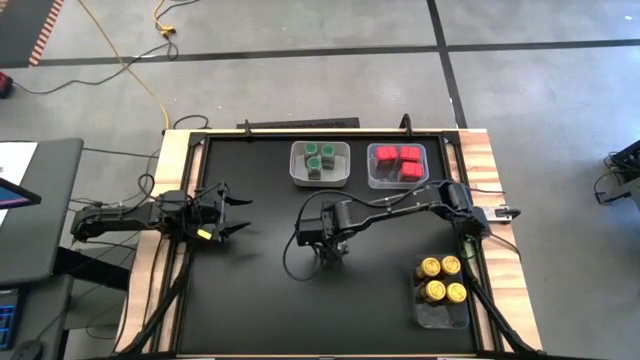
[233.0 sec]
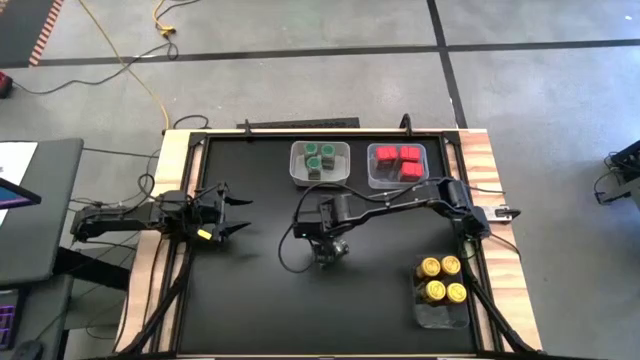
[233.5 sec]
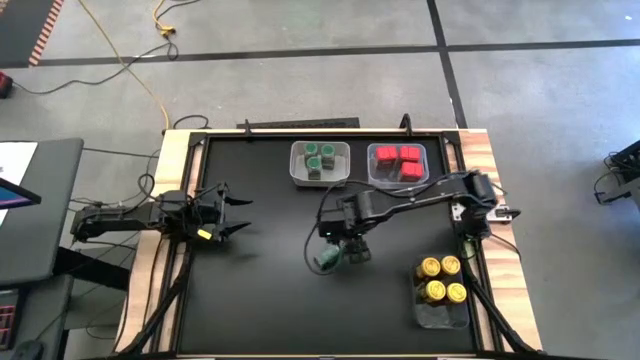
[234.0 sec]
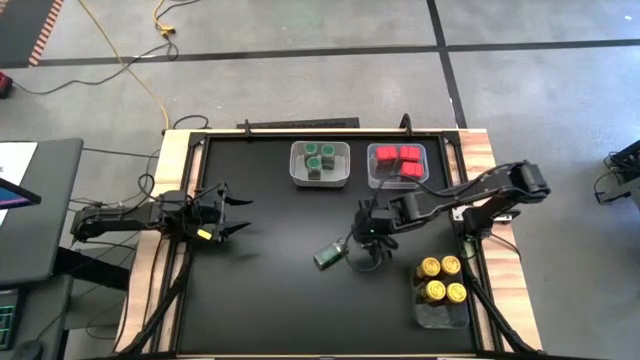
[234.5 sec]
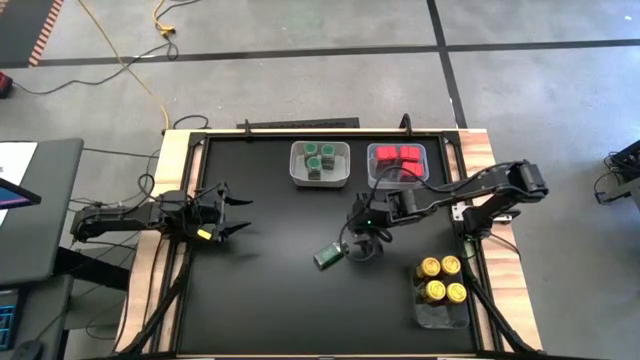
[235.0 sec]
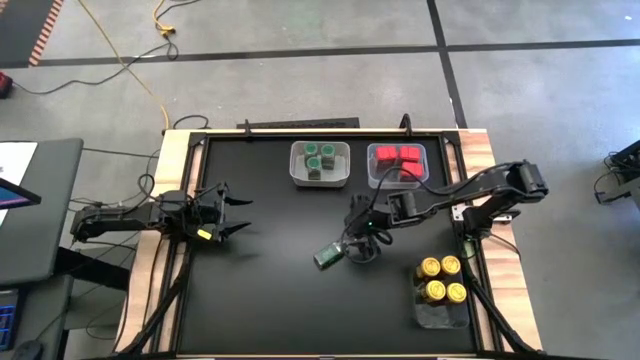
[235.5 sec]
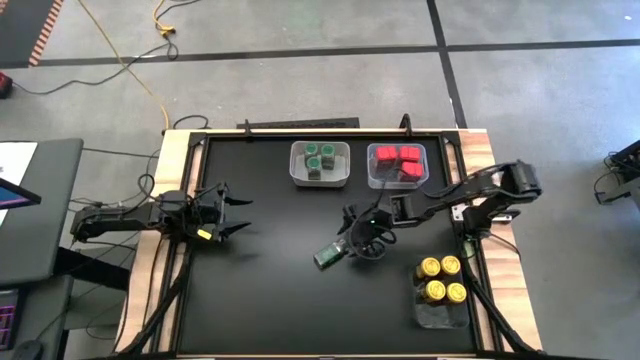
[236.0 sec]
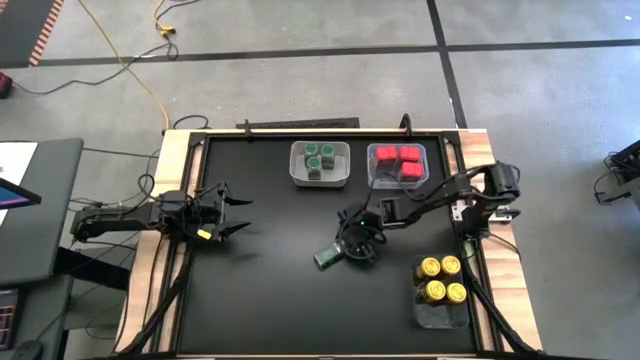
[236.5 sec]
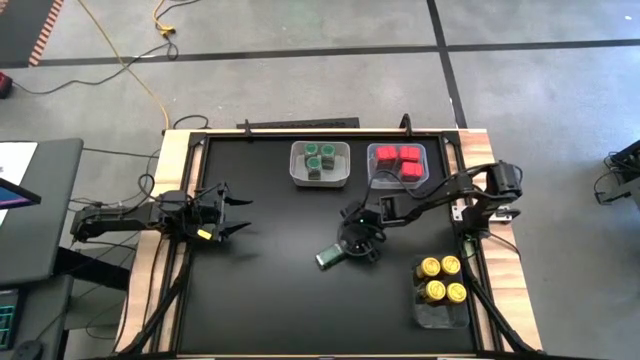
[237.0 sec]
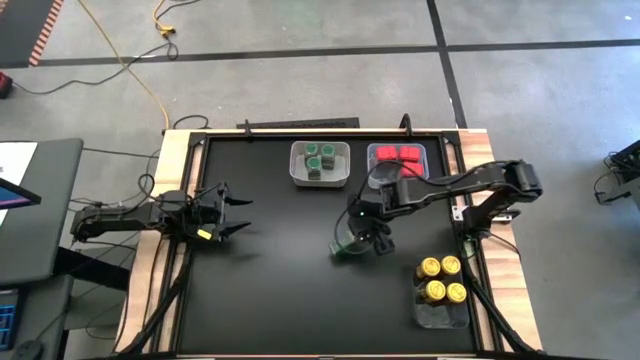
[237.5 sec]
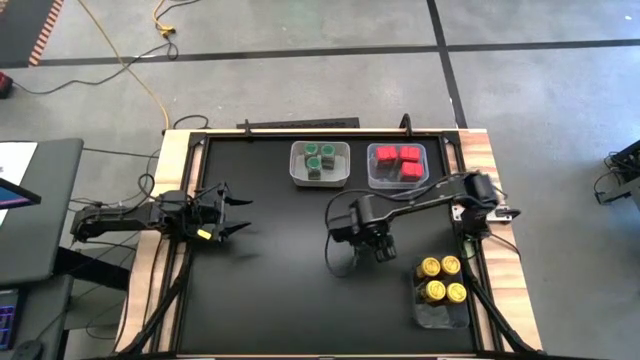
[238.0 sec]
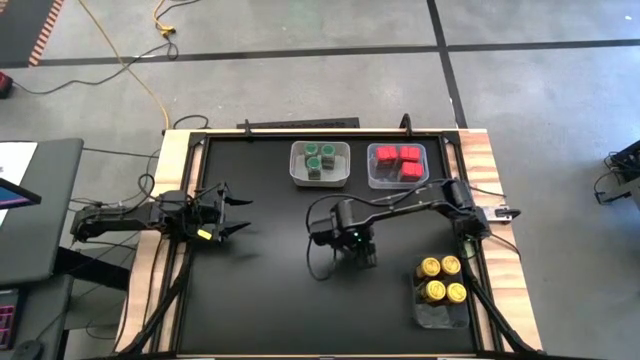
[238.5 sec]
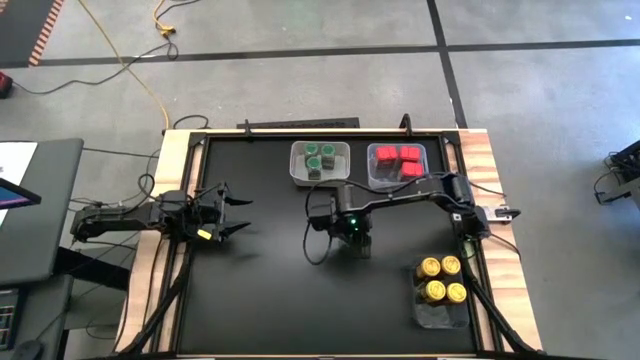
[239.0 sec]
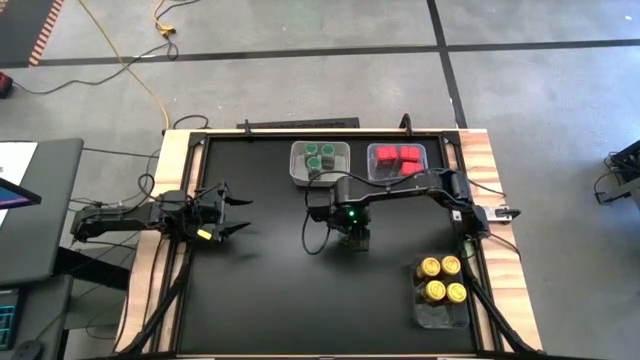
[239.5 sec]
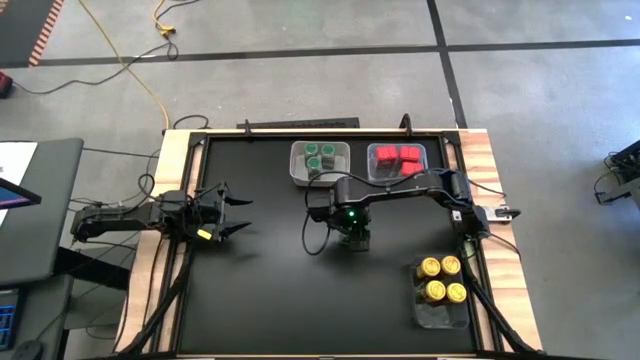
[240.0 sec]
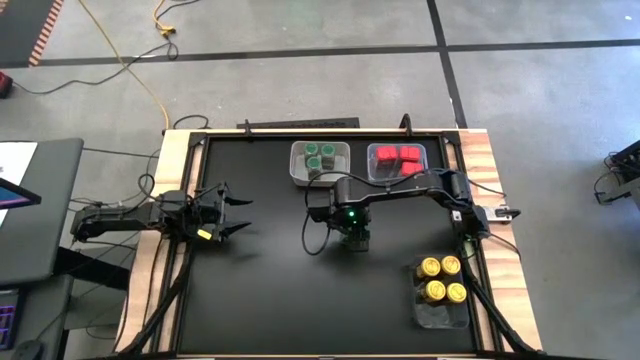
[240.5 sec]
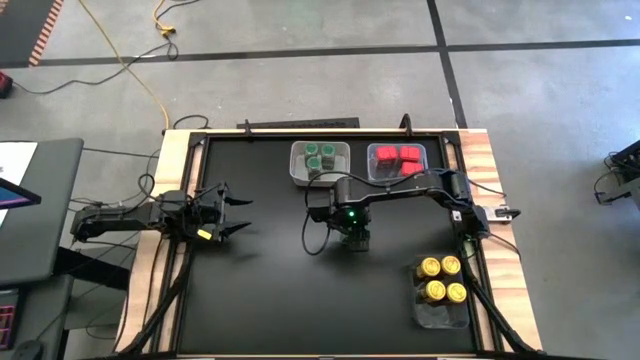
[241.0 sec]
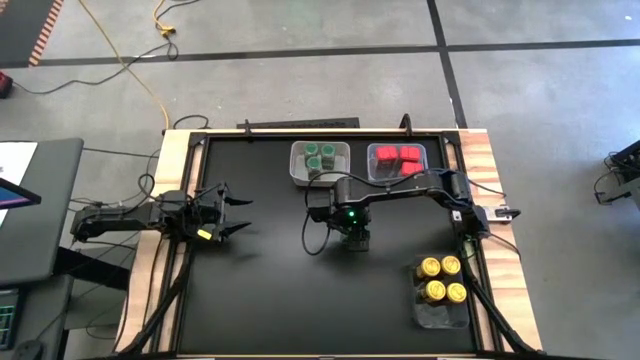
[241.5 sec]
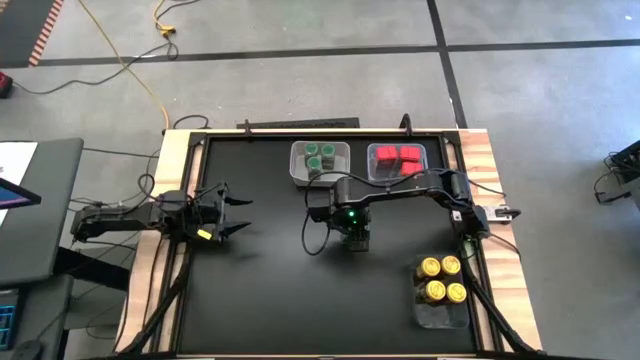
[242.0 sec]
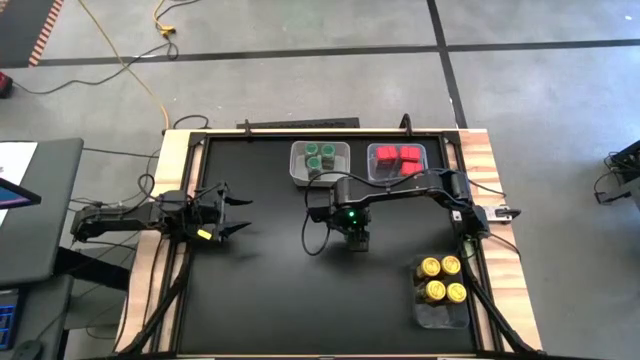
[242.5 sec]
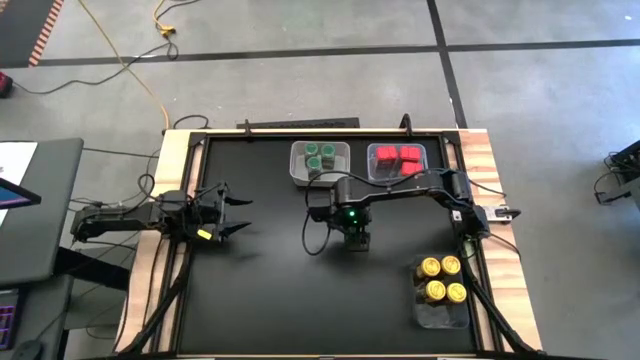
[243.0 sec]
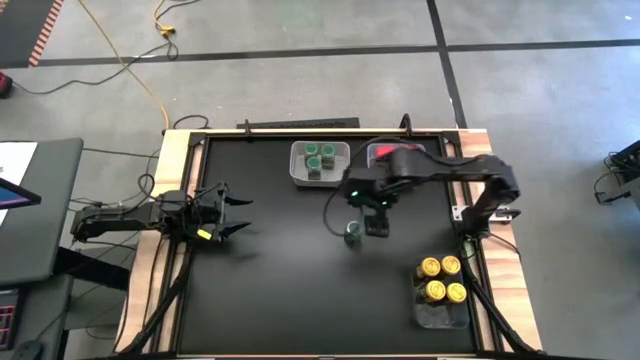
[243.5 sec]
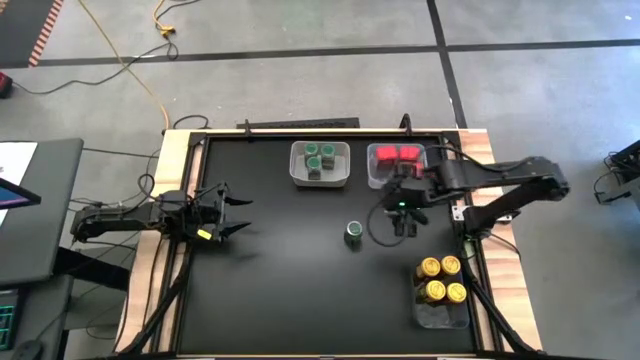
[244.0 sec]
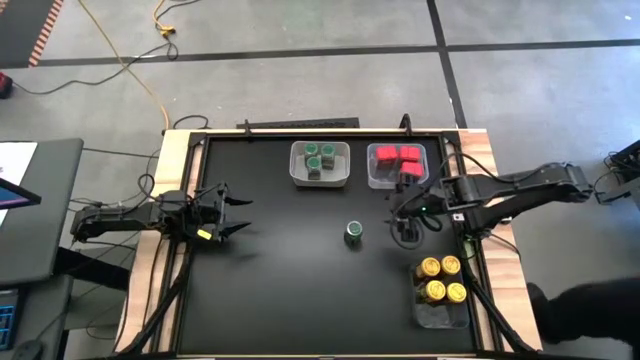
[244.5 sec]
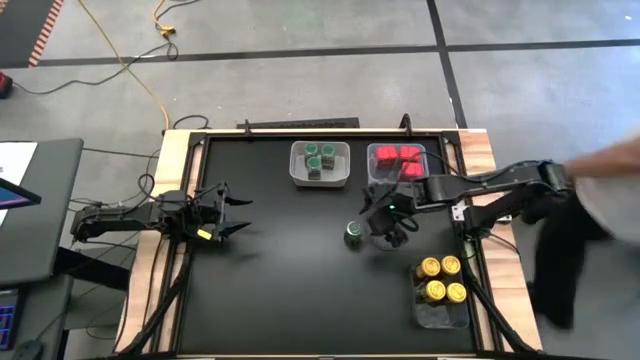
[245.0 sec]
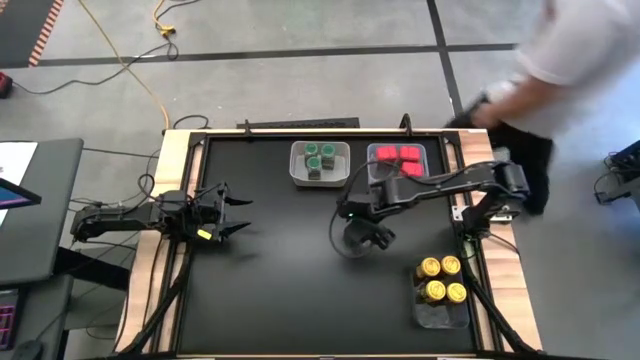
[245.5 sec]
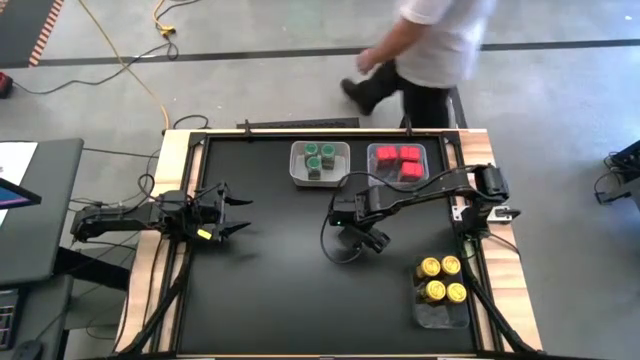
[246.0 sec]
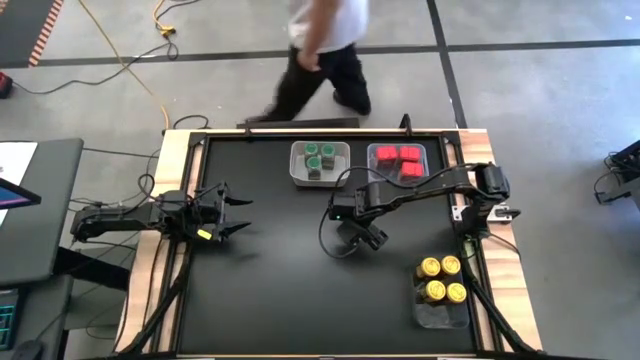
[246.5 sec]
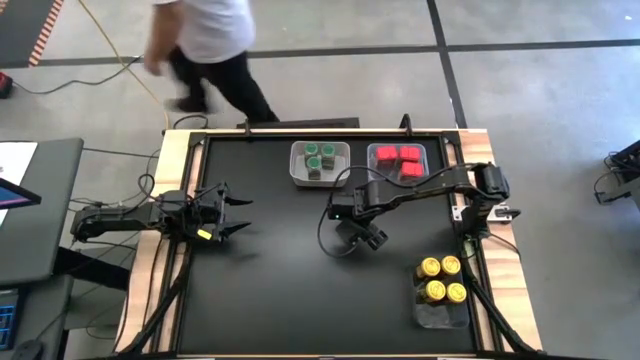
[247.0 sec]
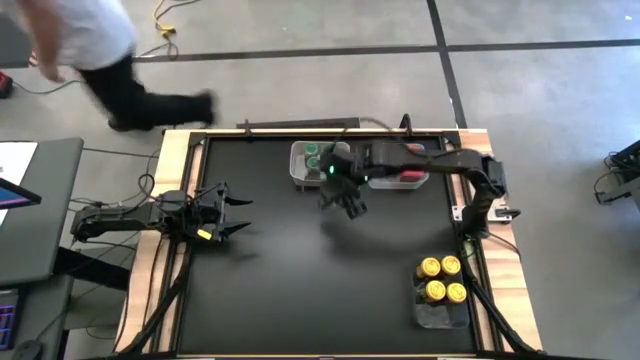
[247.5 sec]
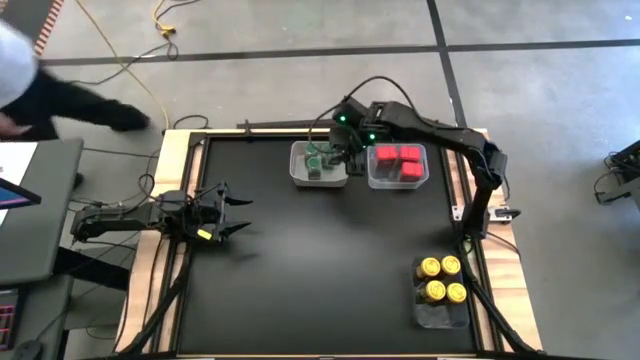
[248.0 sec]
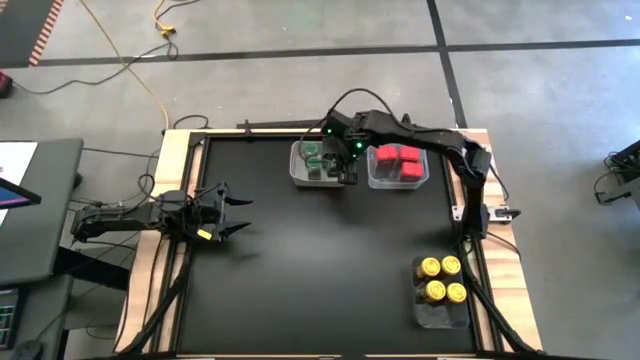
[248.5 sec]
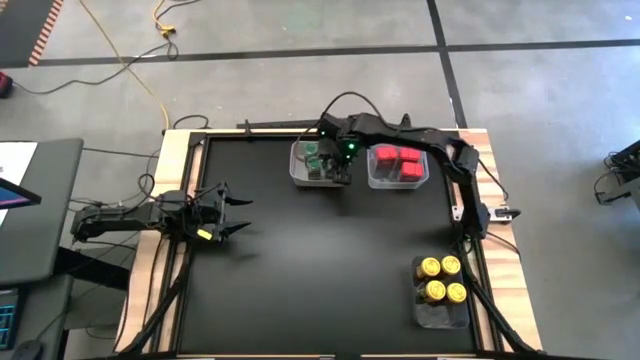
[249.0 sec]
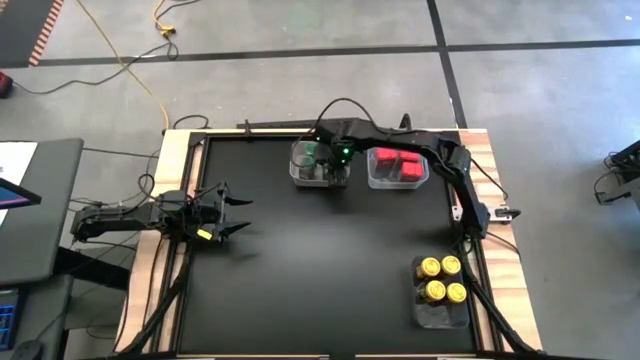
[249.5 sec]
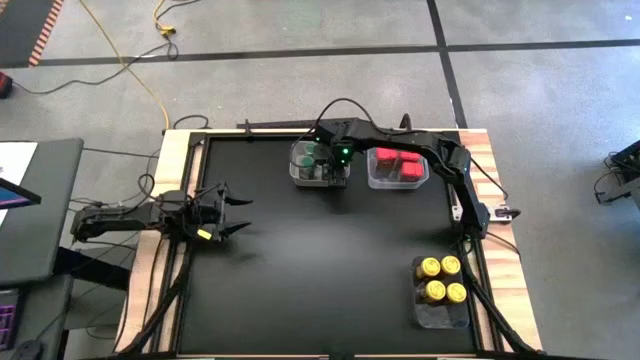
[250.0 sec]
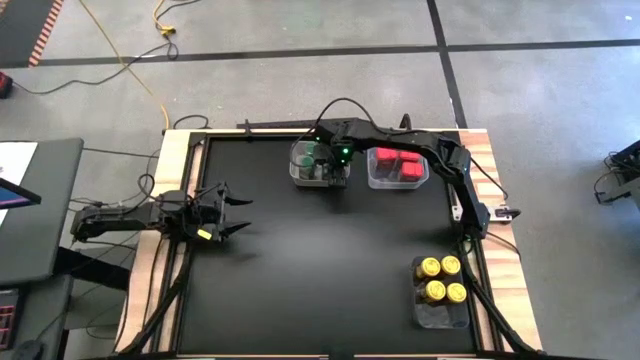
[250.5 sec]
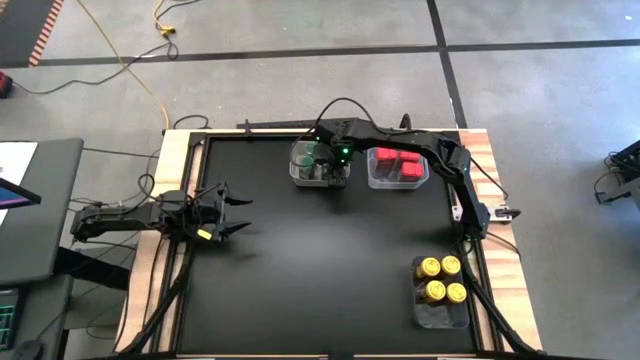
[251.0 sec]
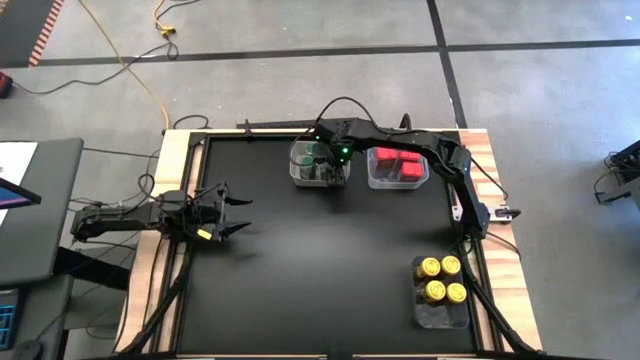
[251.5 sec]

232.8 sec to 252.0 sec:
Task: Sort spices by type
Put the green seasoning bottle into the white bin

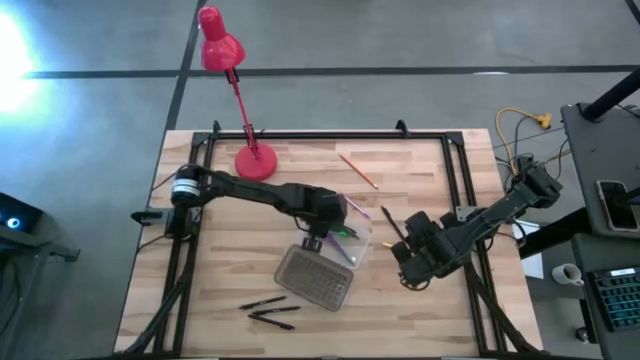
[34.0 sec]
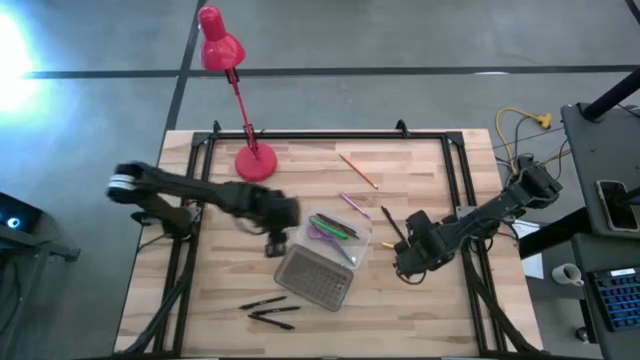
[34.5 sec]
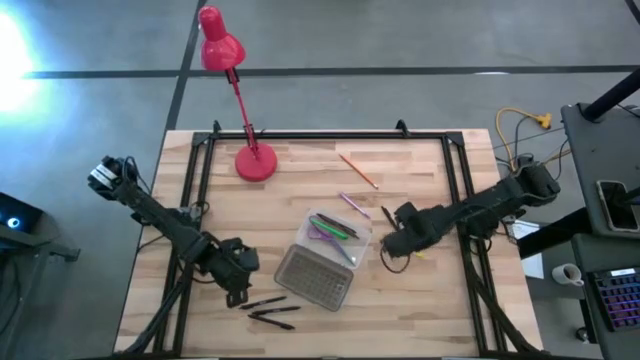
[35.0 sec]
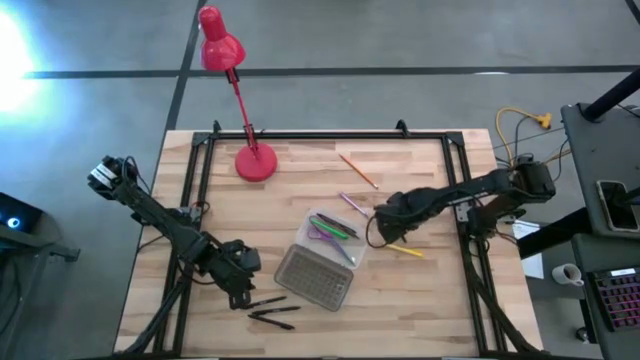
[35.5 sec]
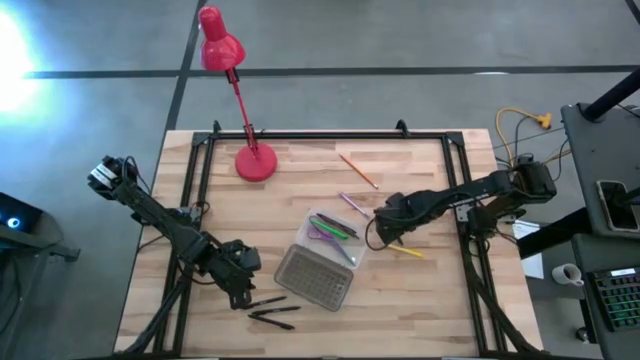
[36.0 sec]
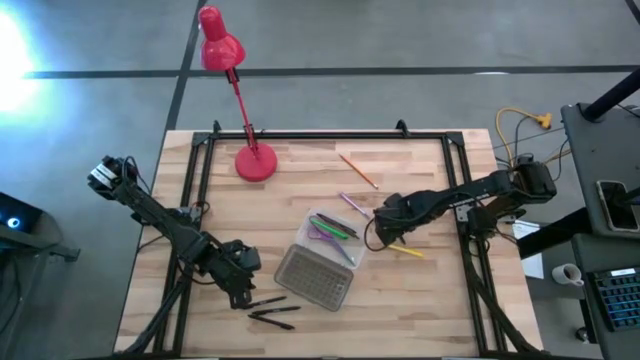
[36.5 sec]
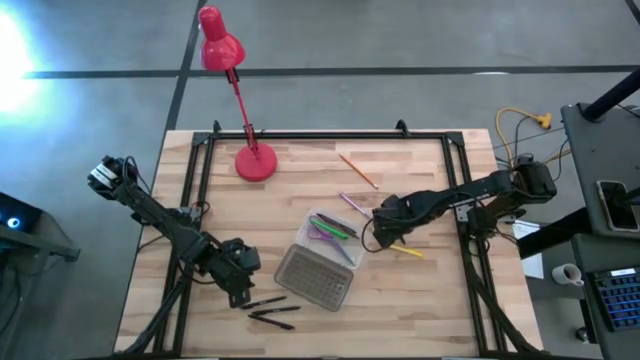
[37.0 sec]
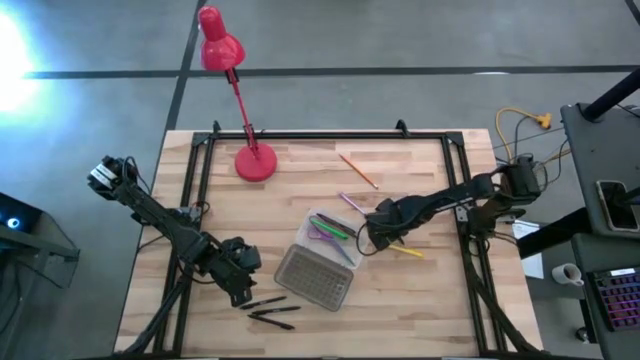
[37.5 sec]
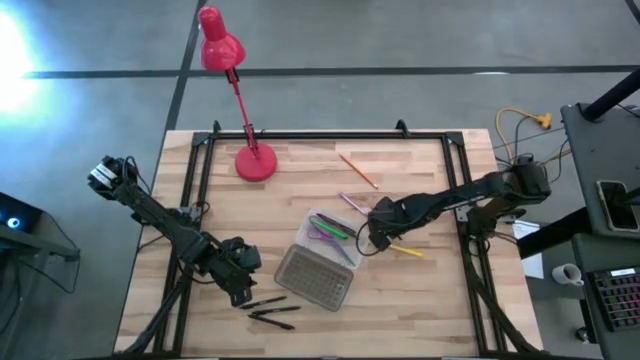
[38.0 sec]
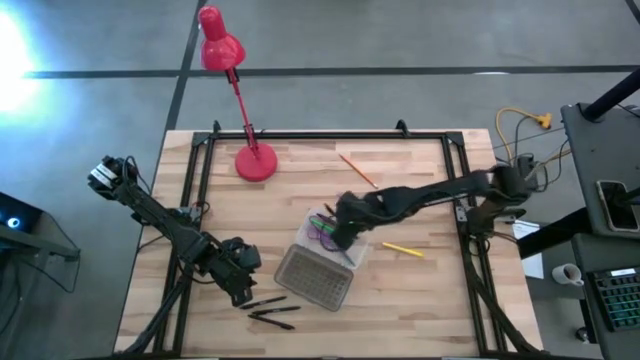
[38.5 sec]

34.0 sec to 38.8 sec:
Task: Pick & place school supplies into a supply box
Put the black pen into the supply box
